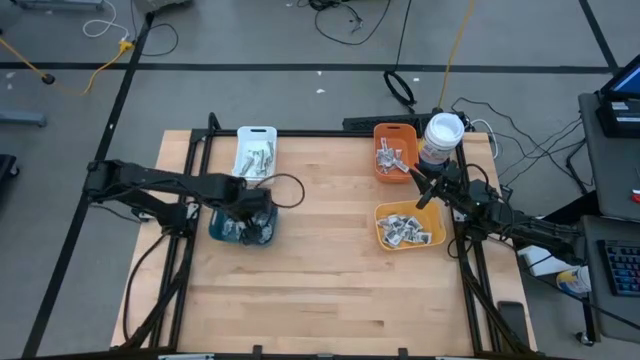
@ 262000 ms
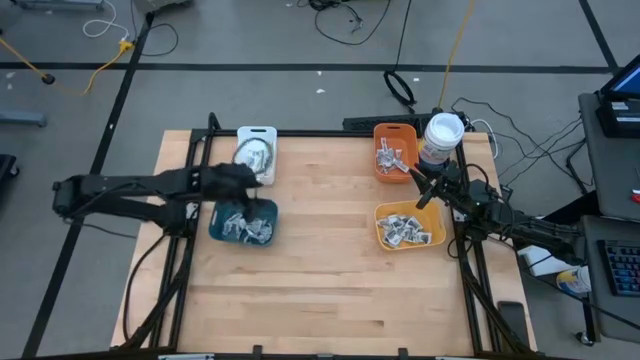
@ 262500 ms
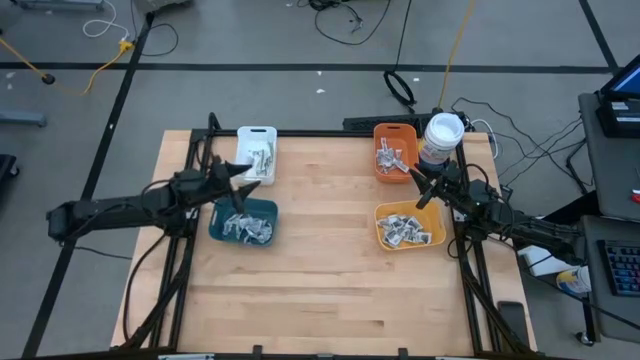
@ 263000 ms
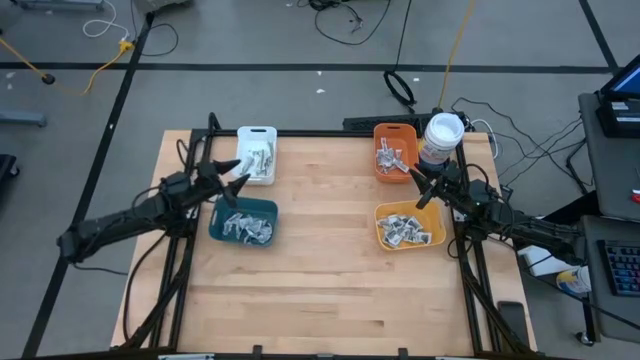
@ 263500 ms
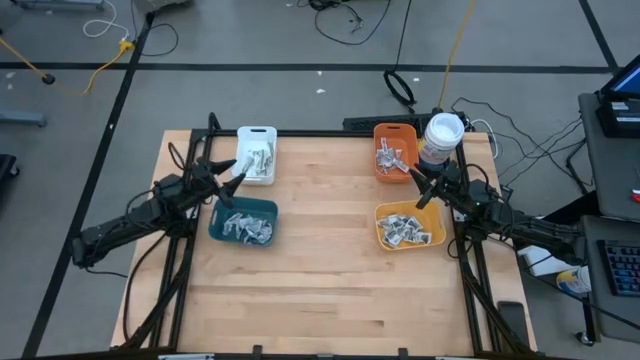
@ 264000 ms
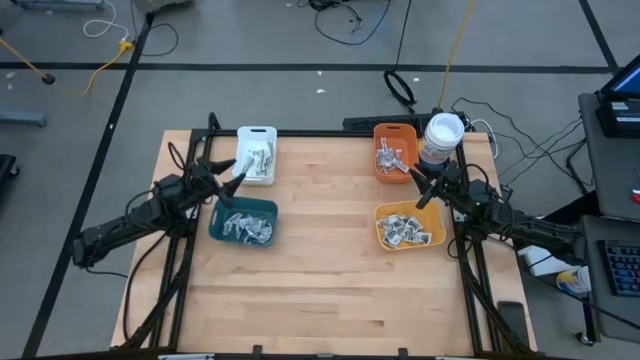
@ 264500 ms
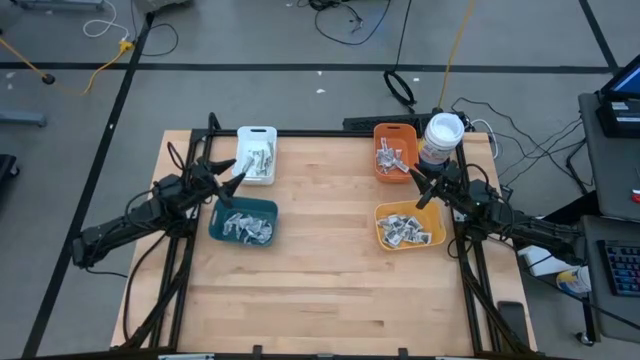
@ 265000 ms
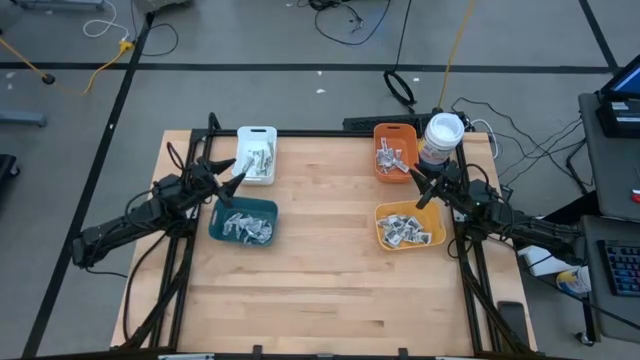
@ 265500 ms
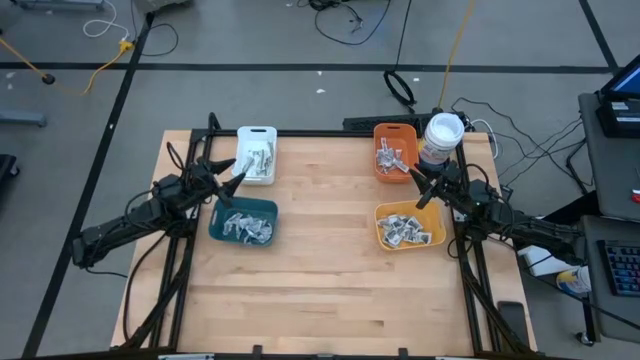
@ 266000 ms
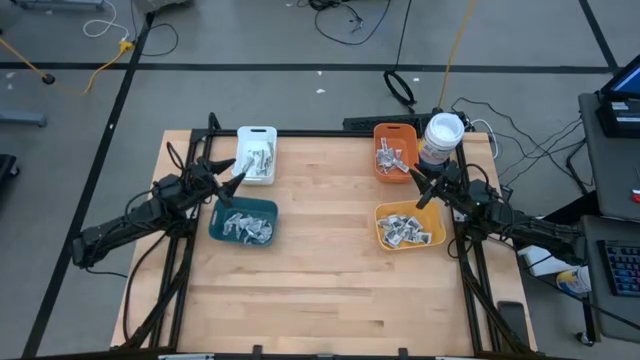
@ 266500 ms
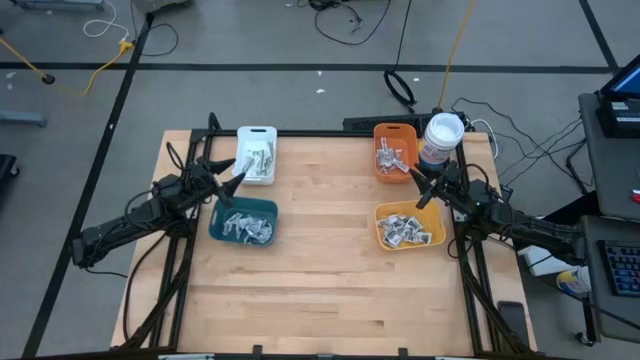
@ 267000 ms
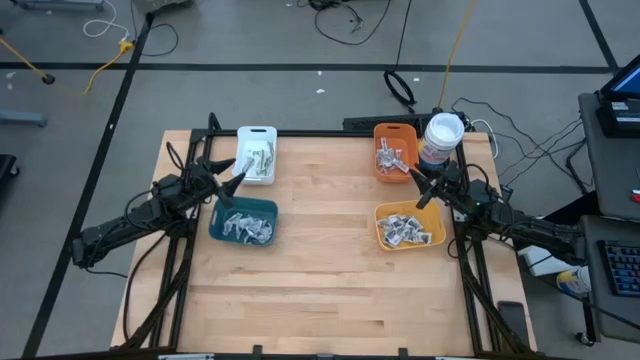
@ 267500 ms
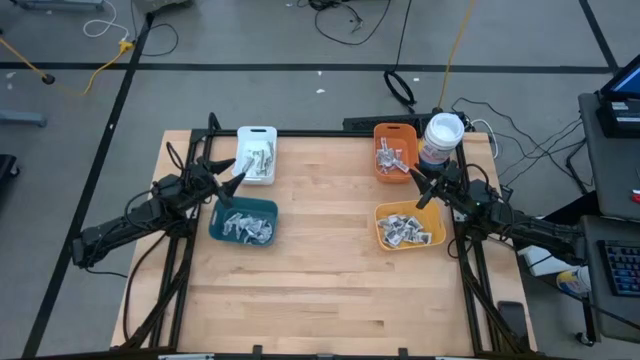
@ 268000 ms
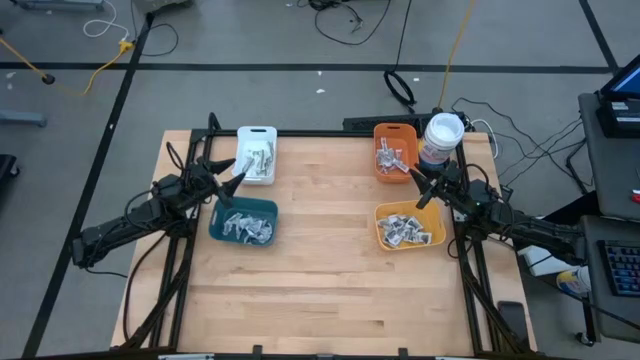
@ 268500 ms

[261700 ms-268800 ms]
Task: Pick & Place First Aid Supplies
Return to Home Position
